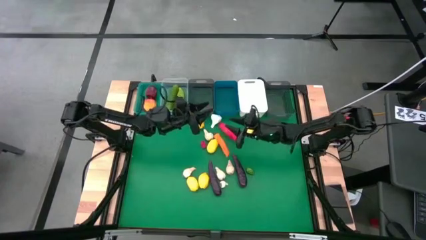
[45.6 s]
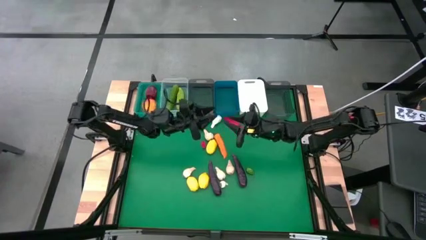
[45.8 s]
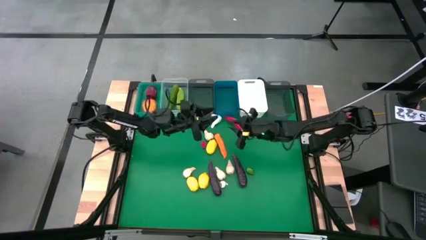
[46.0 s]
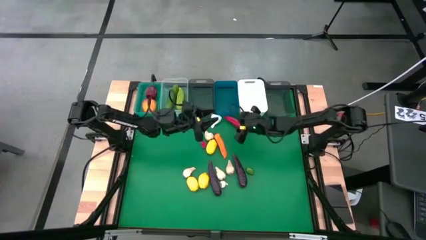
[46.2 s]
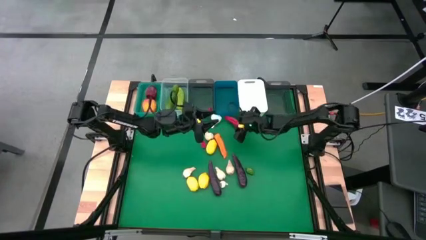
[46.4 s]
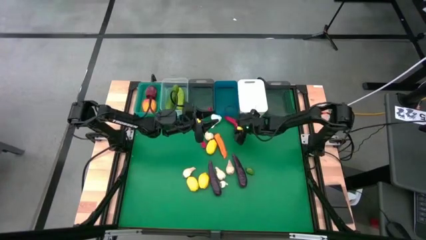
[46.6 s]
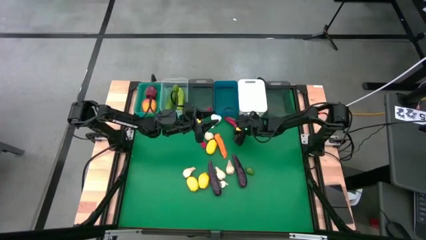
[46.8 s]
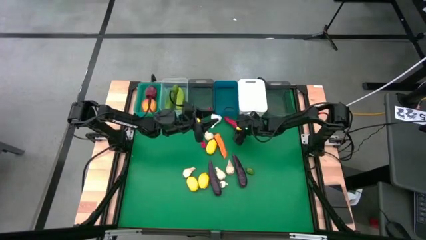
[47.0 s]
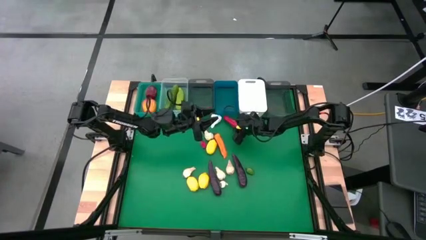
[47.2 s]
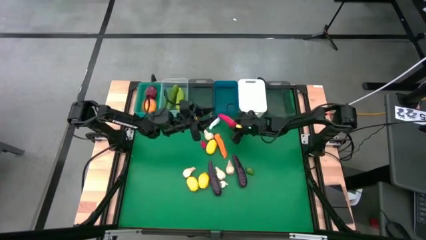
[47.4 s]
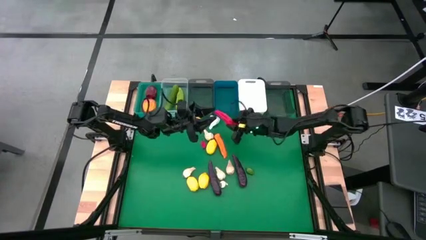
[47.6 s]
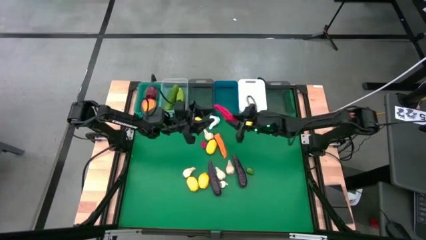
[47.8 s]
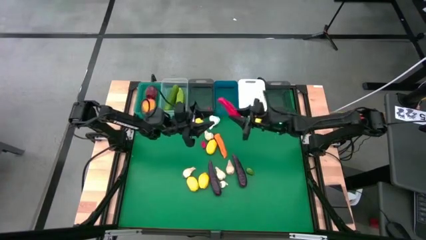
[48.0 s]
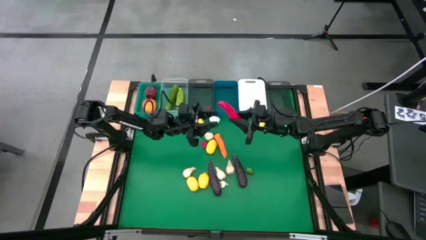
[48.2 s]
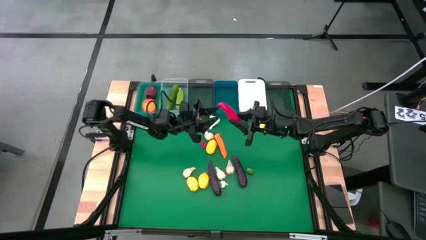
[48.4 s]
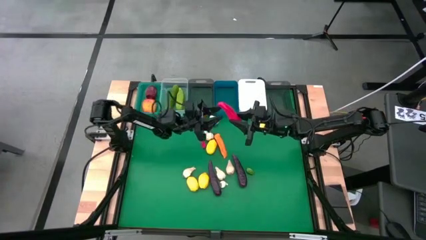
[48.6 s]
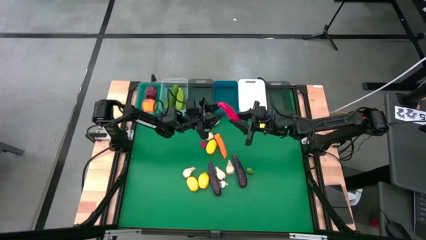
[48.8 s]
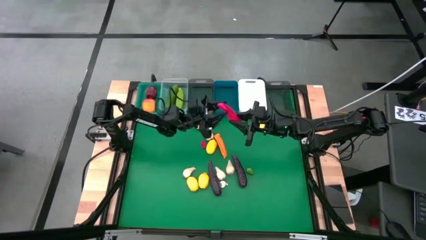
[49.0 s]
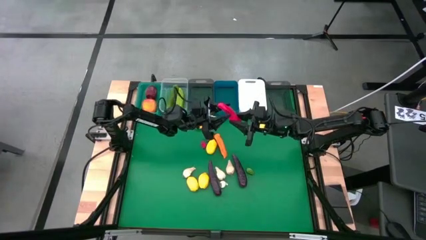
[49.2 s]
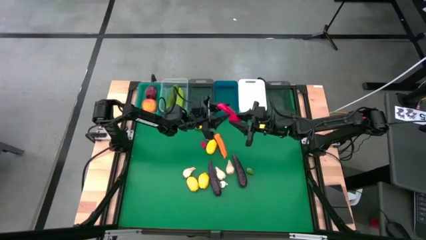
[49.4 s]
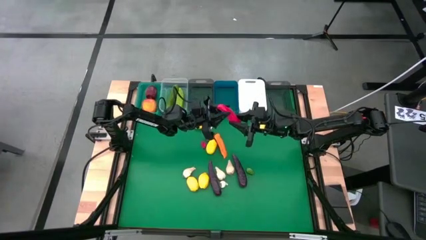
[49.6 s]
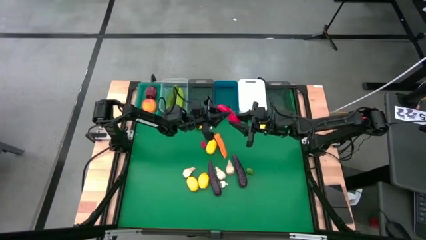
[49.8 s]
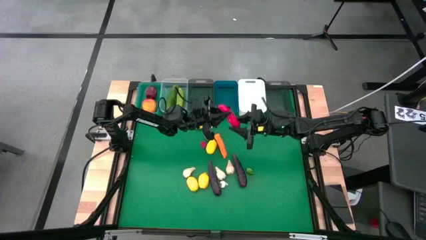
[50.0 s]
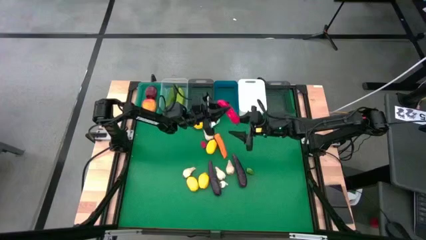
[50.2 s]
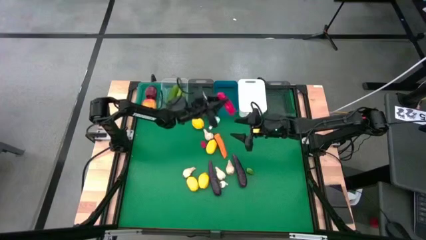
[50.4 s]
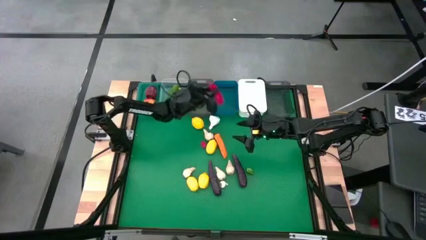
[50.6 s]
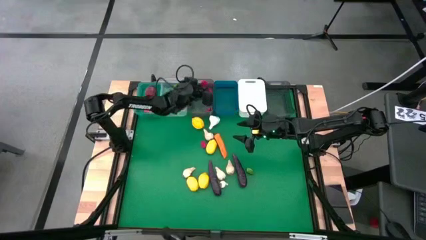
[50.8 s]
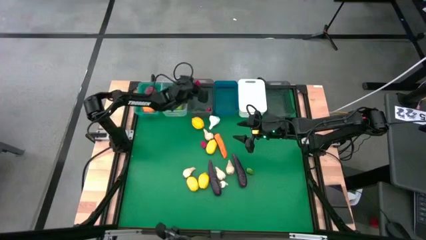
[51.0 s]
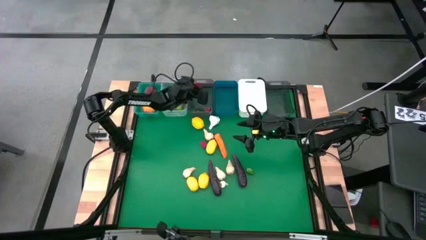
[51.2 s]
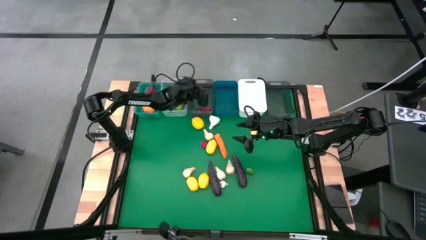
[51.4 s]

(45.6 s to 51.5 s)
Task: Sort produce into baskets
Put the red chili pepper into the left black bin

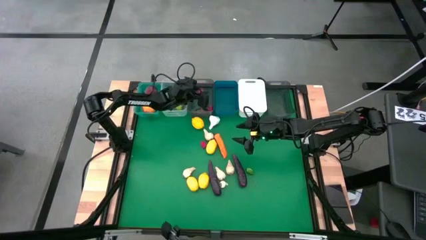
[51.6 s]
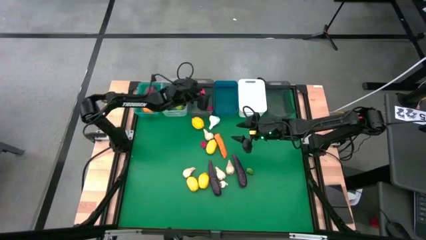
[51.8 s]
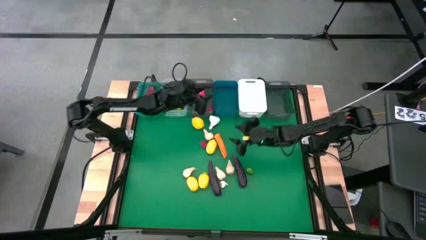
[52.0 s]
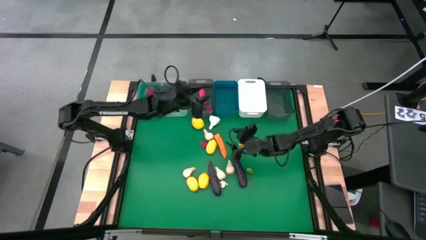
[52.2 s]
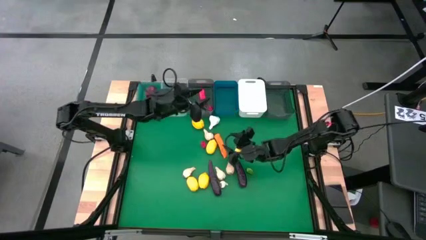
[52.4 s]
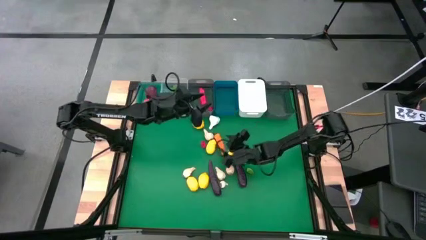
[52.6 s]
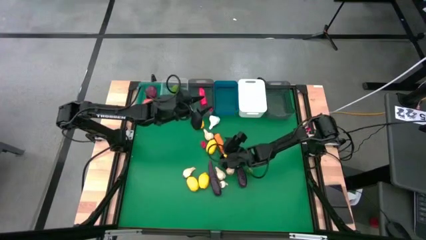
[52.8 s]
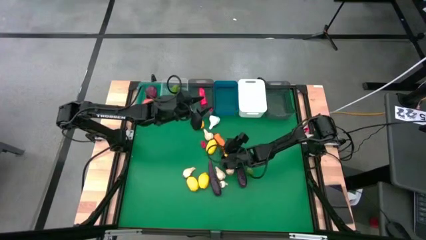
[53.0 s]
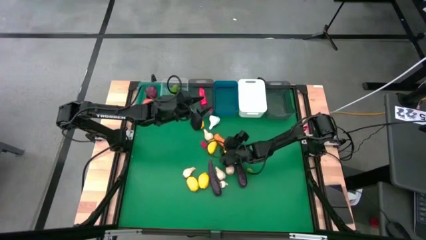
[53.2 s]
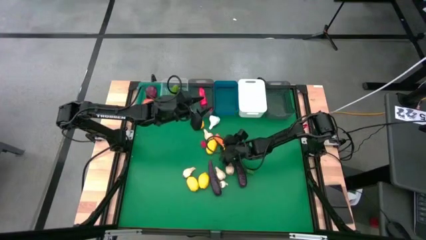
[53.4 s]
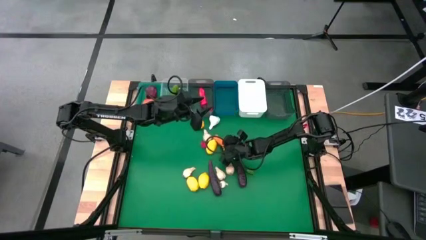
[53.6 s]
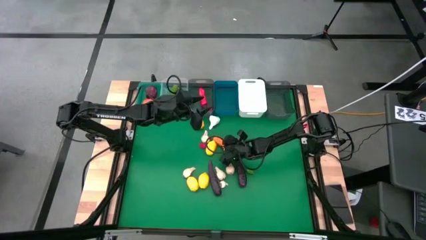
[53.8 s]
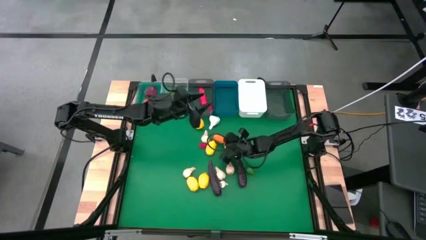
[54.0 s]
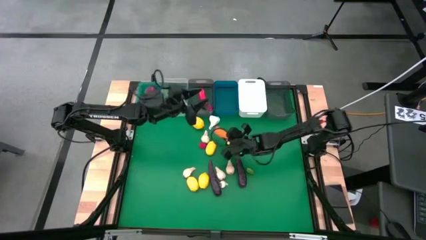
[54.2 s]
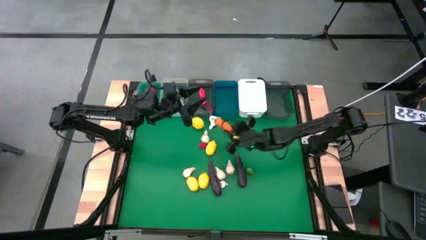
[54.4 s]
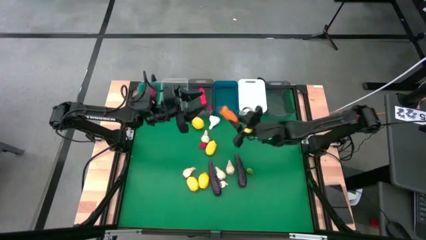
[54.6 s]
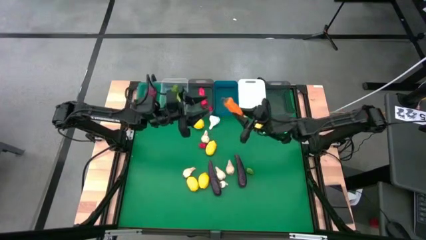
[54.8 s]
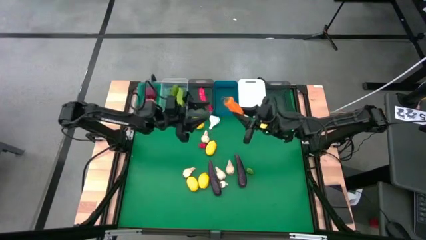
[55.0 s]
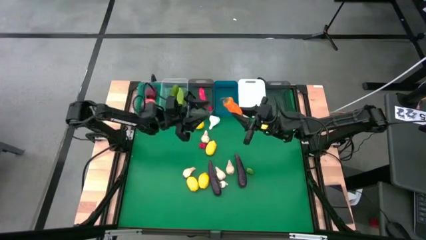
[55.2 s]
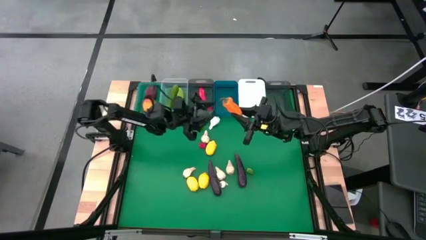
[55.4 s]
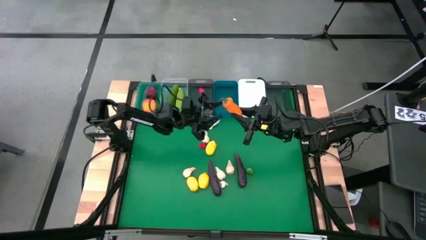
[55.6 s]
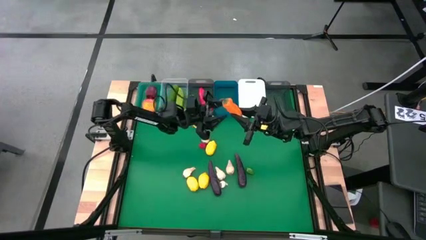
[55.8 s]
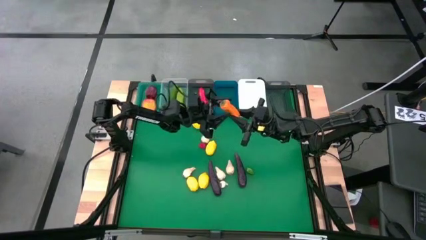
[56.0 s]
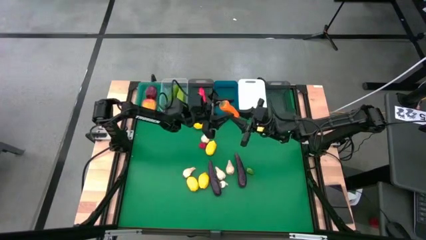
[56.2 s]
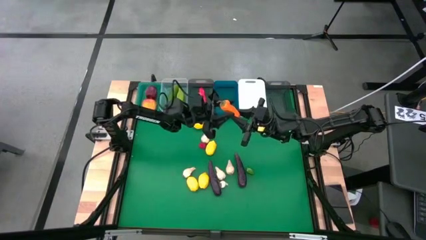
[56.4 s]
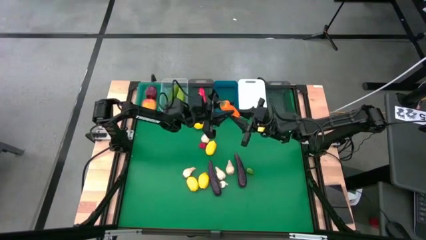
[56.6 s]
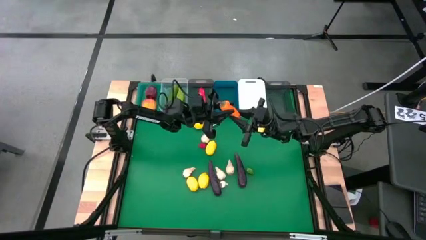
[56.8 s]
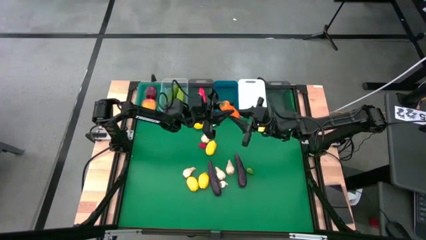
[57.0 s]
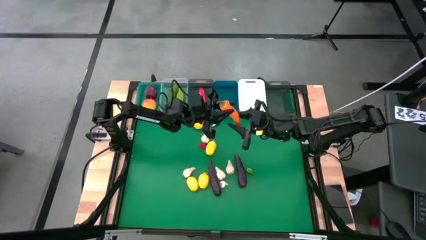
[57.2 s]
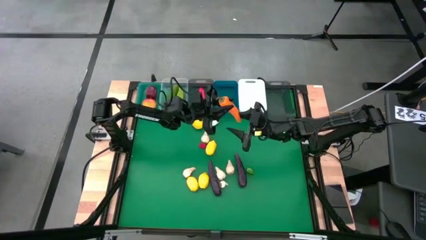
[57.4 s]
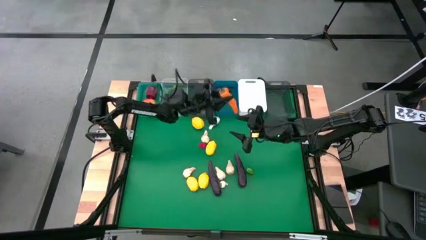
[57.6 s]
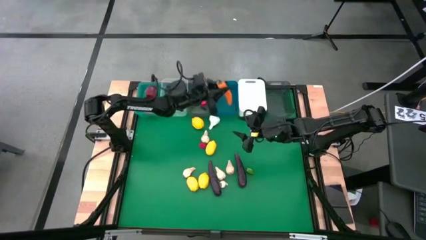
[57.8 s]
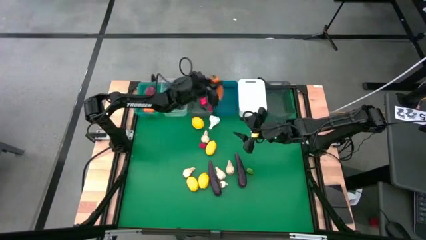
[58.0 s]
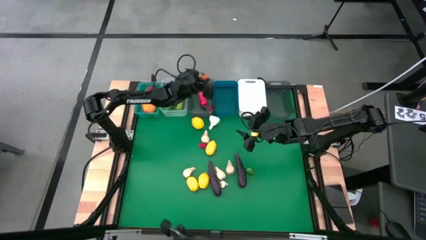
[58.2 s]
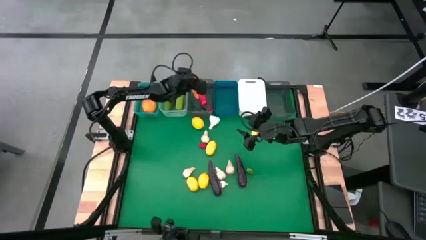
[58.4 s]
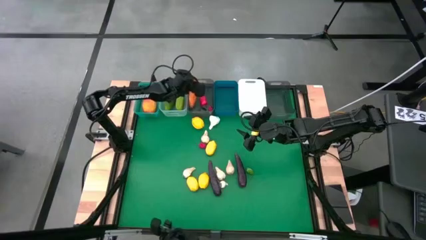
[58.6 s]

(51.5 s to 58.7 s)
Put the orange chili pepper into the left black bin

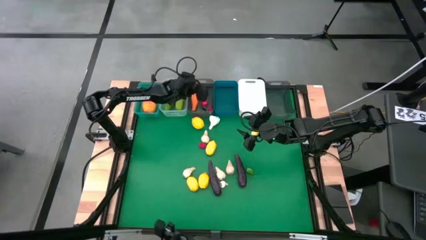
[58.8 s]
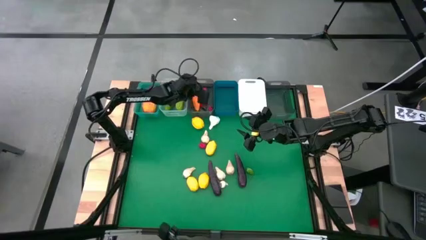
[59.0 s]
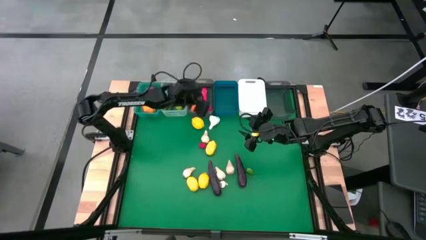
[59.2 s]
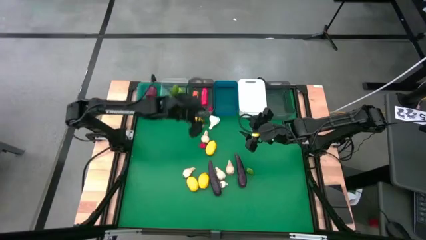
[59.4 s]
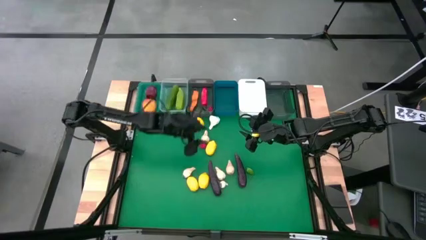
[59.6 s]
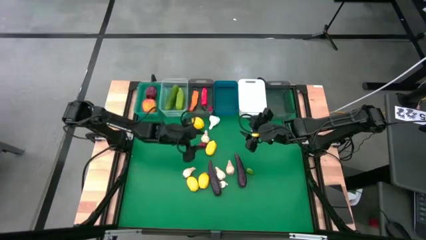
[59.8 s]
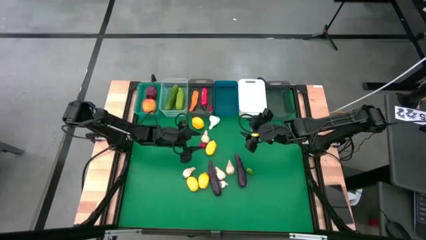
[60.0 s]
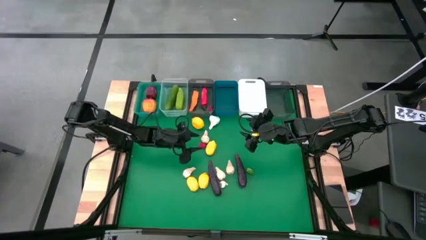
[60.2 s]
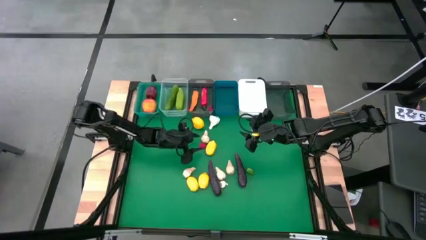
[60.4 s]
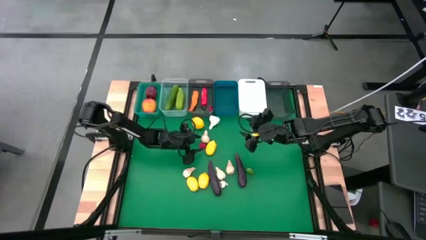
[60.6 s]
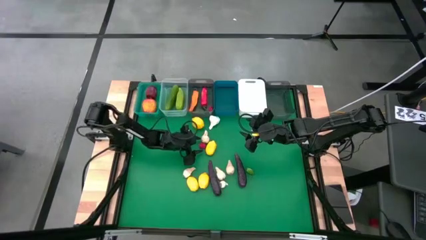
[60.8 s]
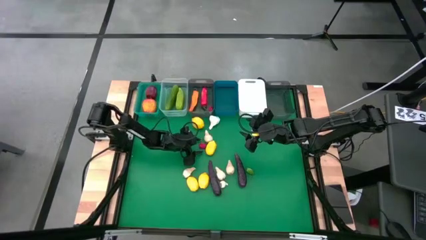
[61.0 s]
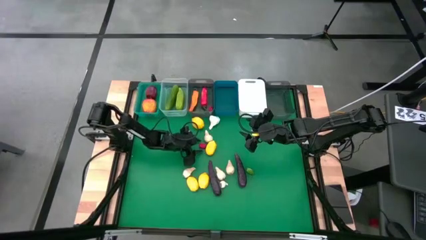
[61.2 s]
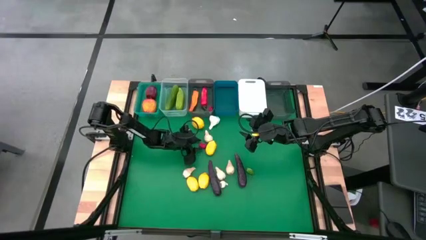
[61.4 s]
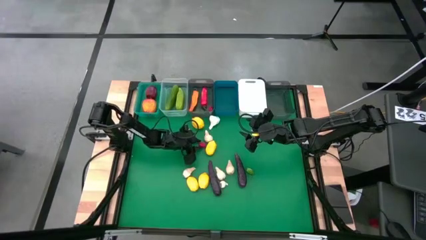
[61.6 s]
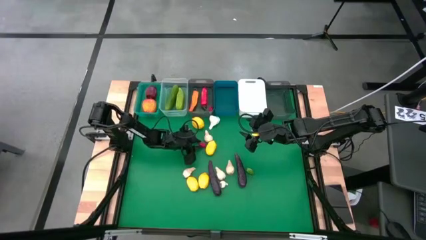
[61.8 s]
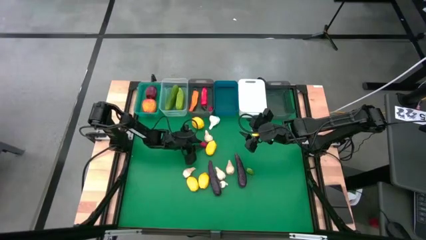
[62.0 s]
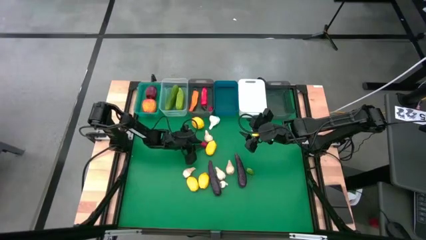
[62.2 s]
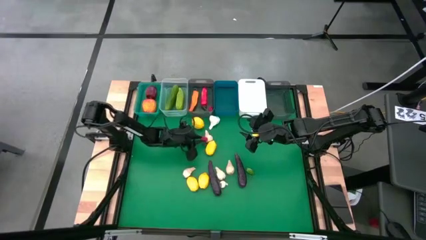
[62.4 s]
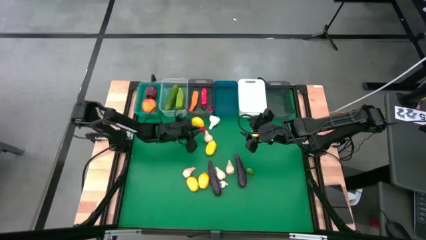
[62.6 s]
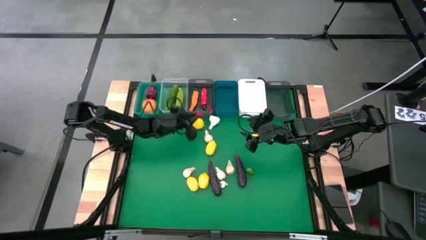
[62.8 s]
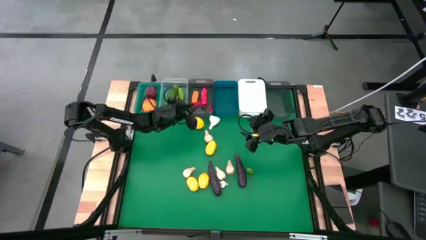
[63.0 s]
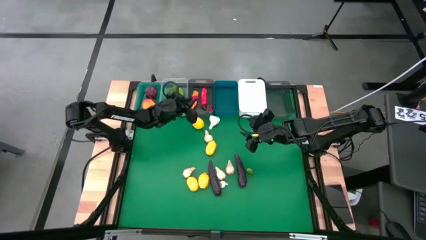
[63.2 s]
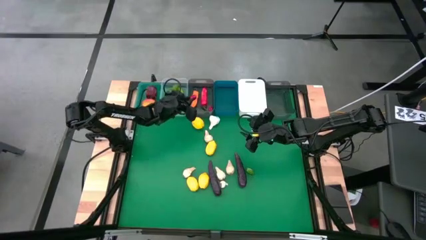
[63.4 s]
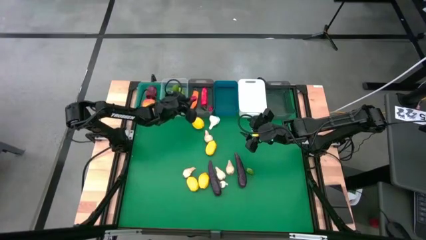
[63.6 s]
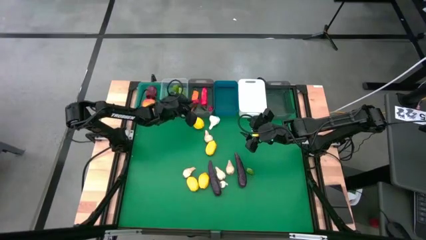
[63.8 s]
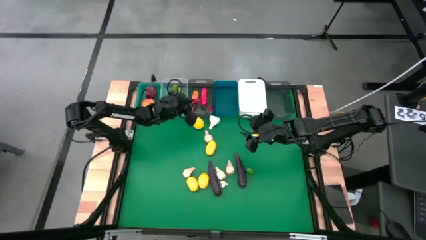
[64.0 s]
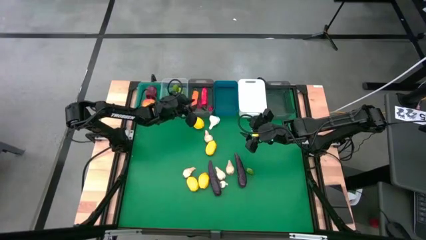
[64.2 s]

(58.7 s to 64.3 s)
Put the red chili pepper into the left black bin
